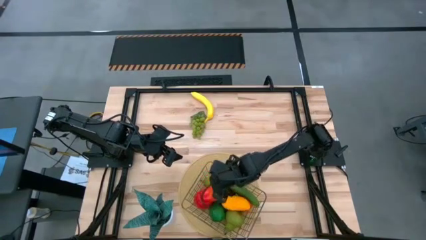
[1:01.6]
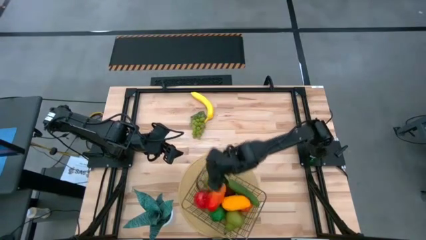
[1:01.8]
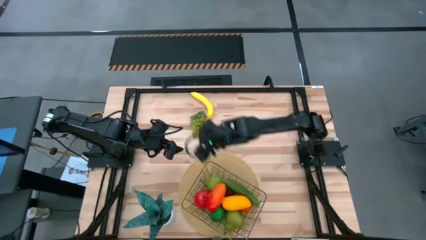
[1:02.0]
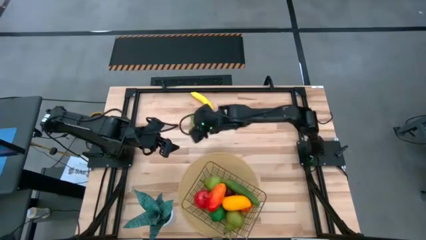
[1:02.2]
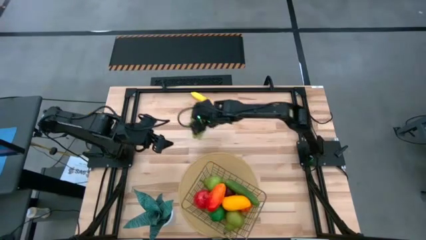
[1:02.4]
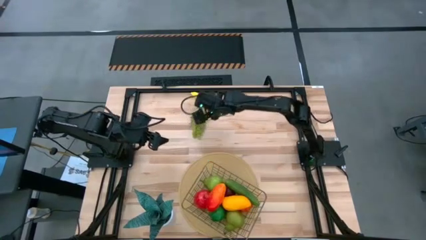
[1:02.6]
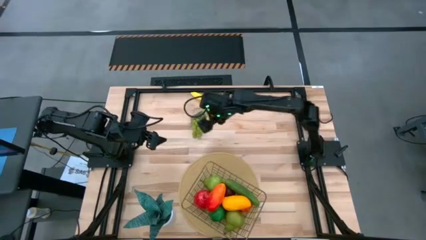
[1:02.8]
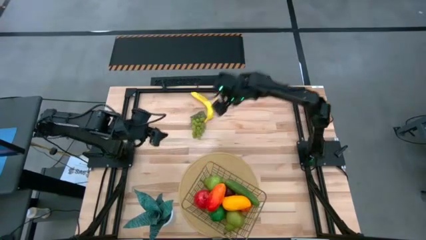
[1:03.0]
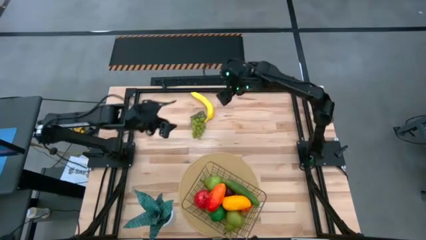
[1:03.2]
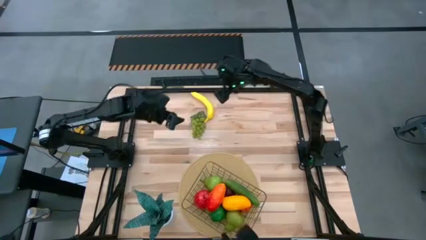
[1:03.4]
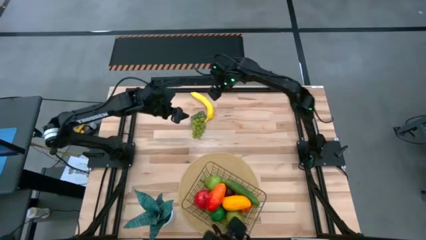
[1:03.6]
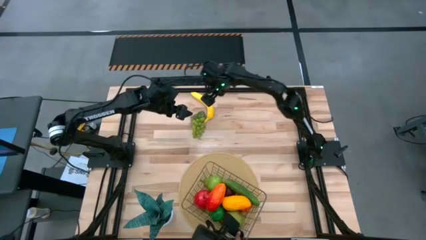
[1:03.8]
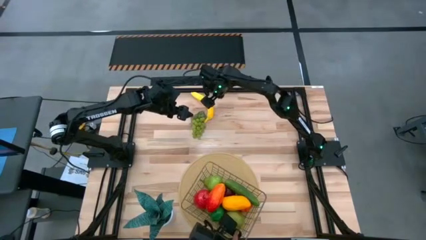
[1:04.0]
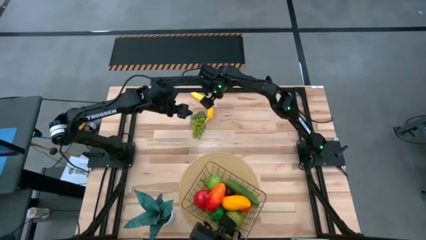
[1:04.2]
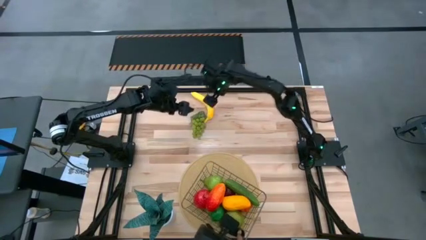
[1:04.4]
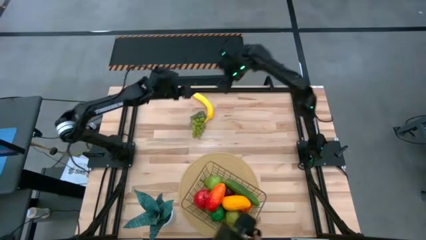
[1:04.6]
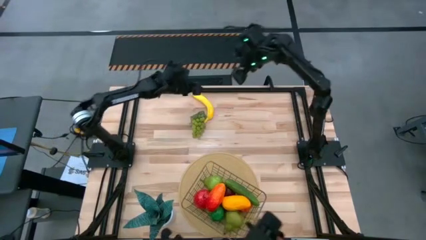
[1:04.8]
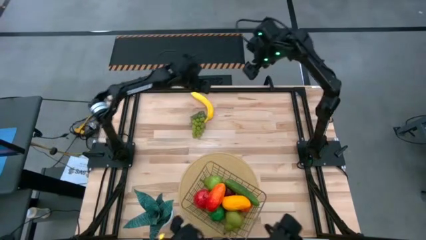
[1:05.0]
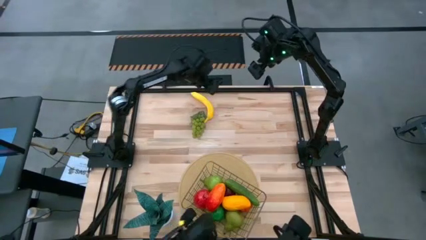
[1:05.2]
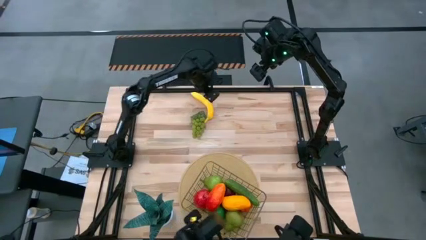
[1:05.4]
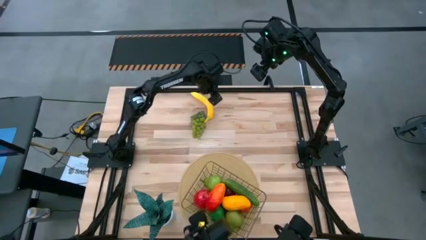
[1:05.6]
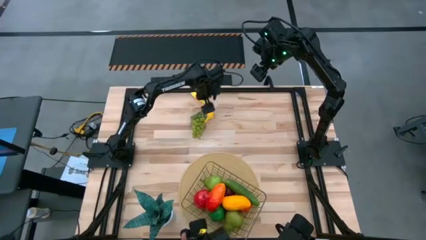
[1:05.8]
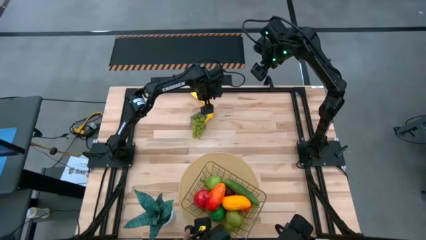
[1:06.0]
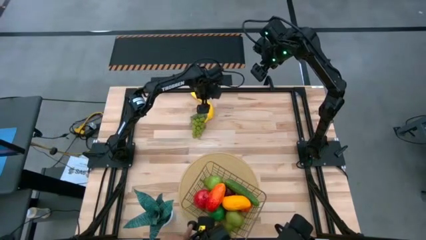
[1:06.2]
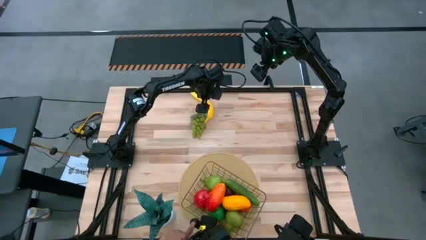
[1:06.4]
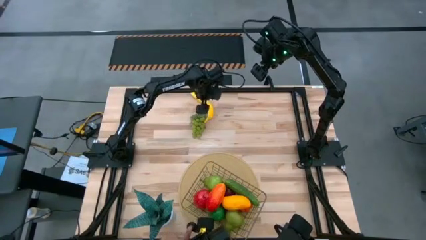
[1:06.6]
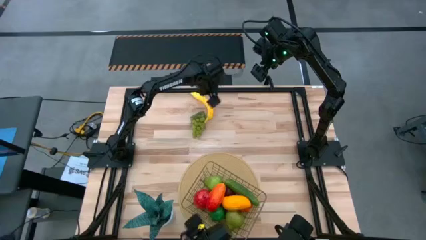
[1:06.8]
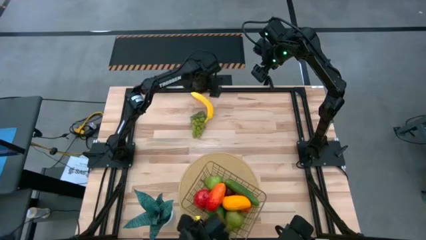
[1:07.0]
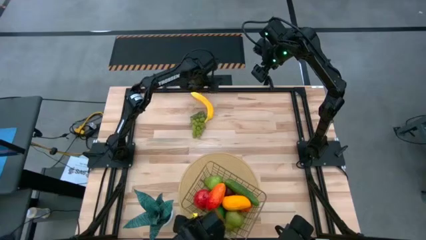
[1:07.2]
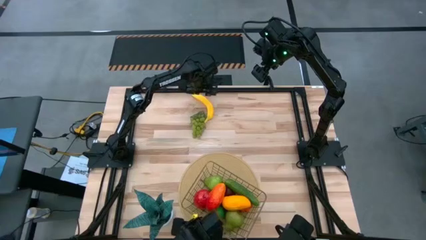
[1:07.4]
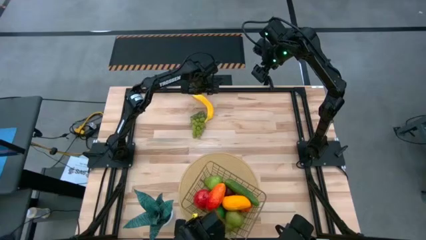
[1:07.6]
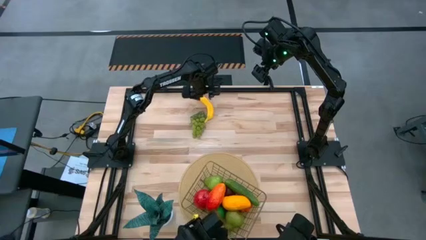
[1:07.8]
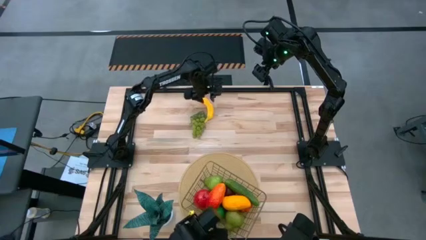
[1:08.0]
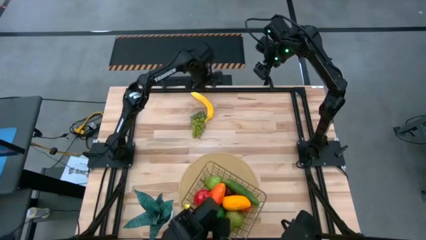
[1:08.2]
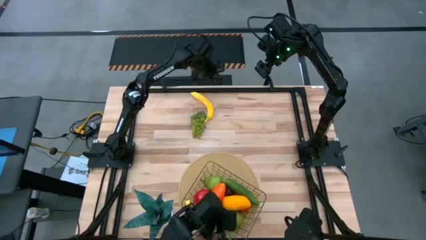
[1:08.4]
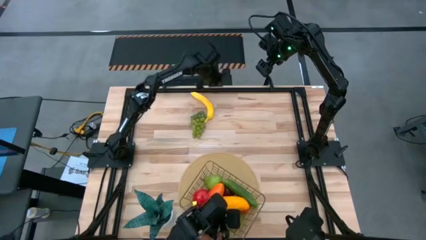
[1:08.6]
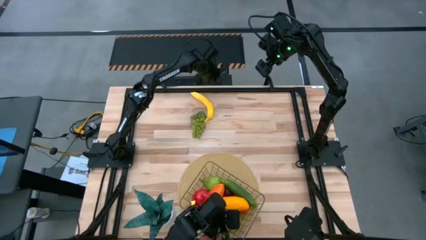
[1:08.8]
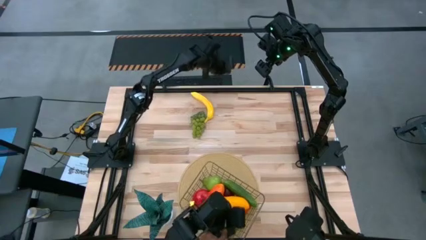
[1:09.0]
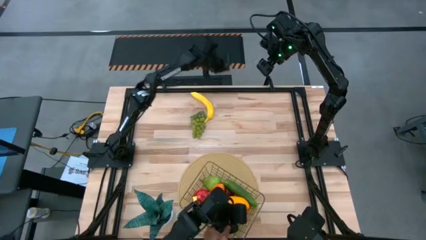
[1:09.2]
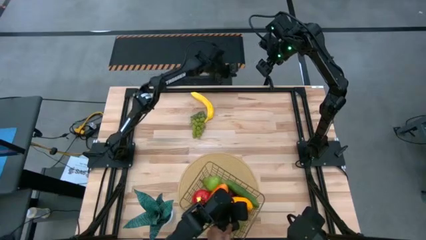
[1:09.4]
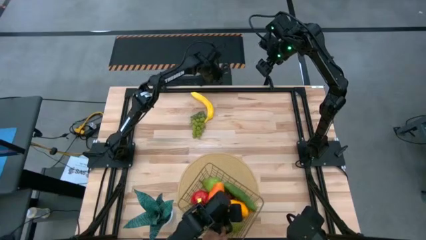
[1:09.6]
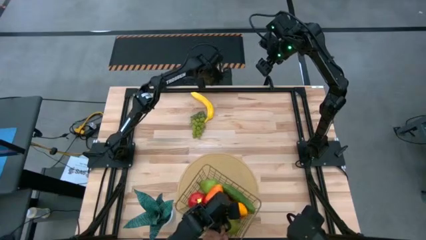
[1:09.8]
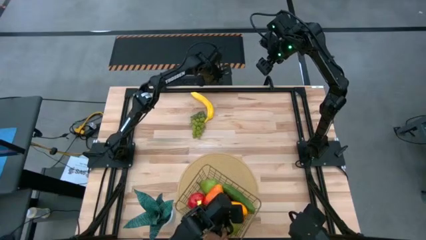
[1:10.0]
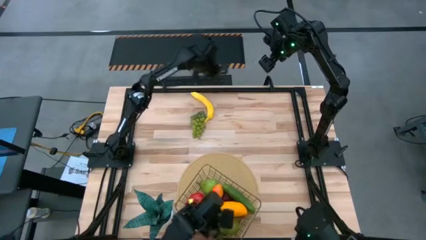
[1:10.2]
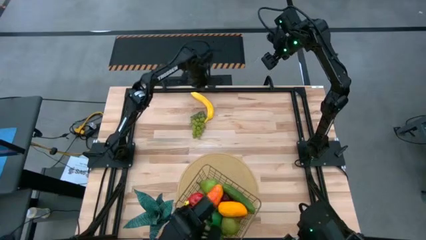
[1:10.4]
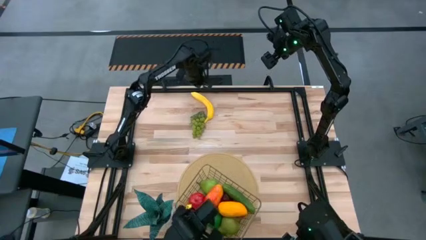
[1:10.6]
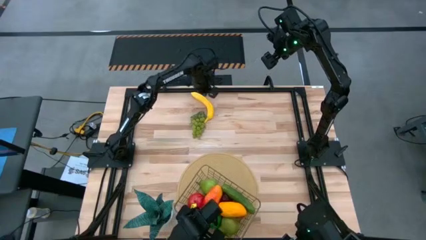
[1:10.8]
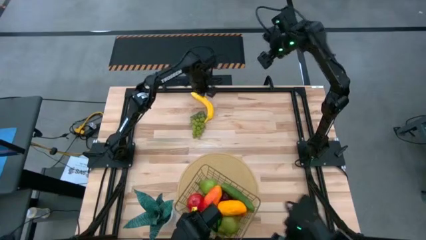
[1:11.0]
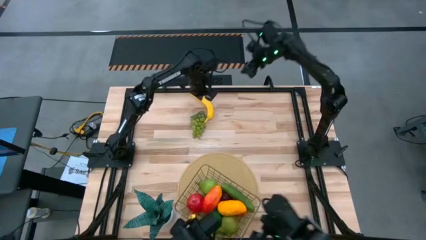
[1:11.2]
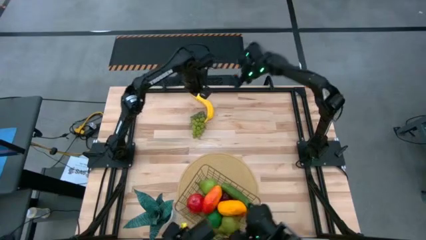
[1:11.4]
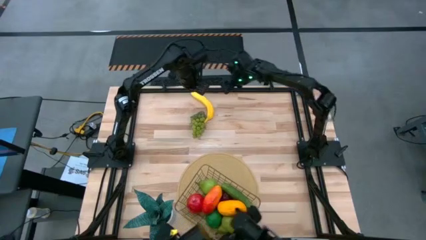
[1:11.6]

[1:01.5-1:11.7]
Task: Build produce basket
Put the banana into the wire basket
